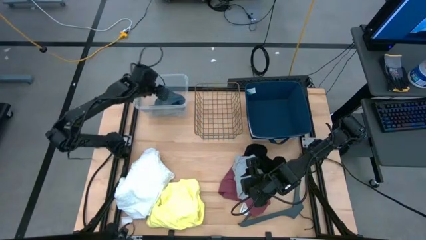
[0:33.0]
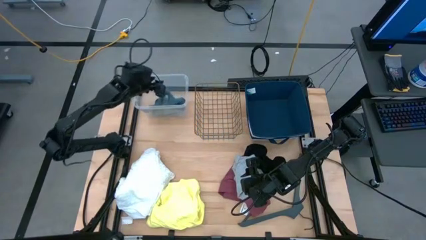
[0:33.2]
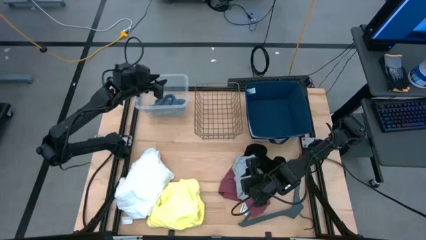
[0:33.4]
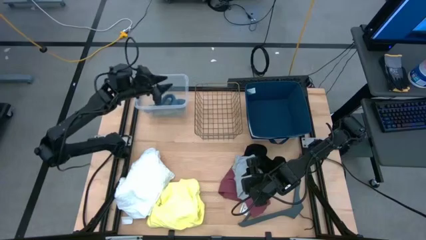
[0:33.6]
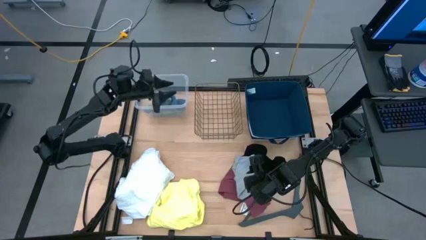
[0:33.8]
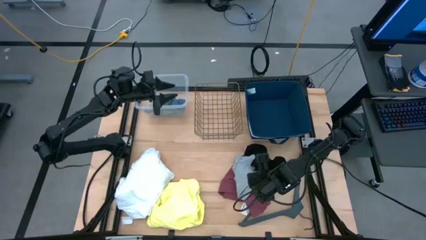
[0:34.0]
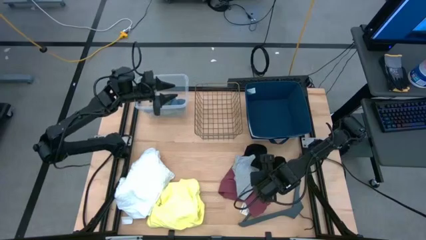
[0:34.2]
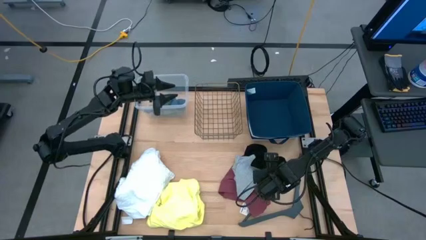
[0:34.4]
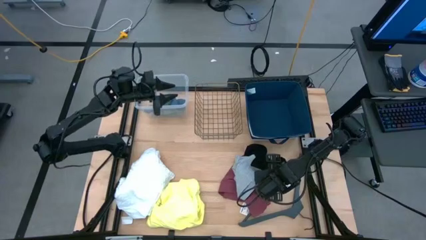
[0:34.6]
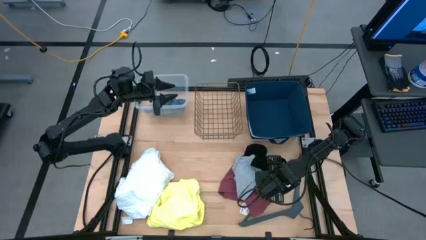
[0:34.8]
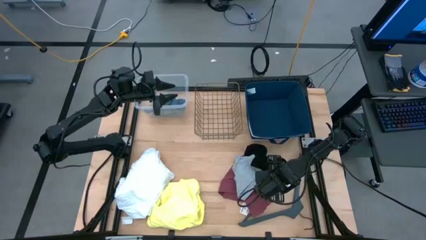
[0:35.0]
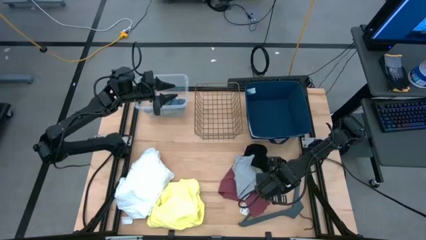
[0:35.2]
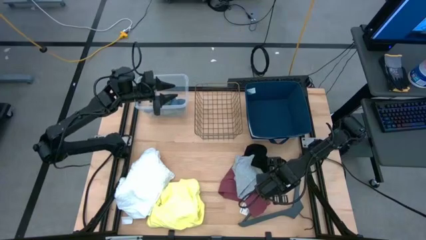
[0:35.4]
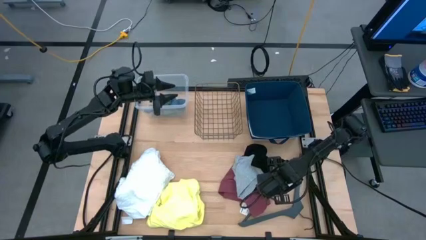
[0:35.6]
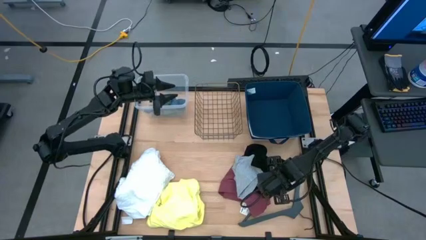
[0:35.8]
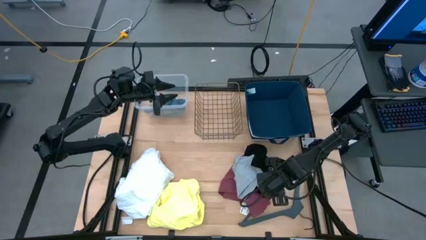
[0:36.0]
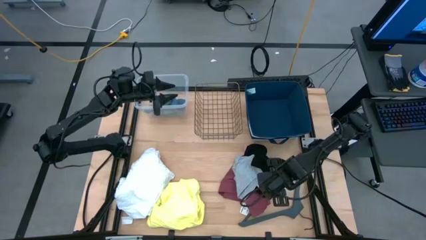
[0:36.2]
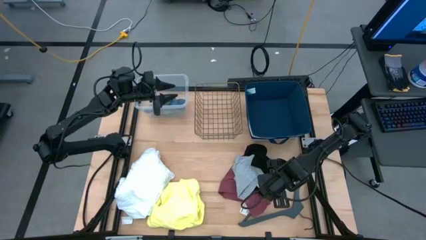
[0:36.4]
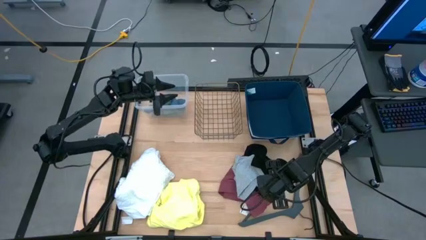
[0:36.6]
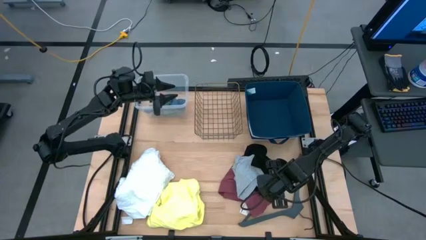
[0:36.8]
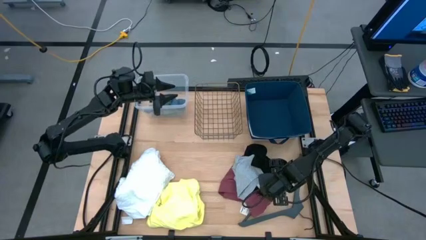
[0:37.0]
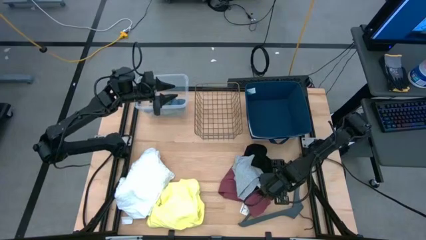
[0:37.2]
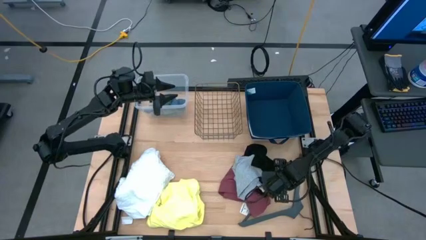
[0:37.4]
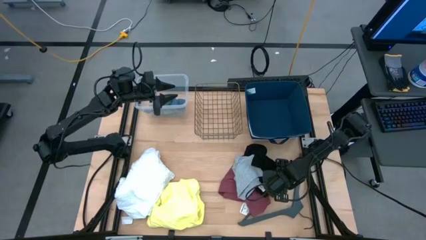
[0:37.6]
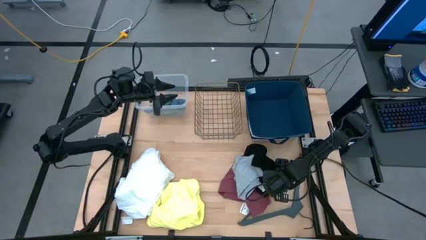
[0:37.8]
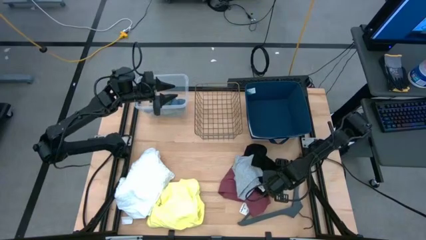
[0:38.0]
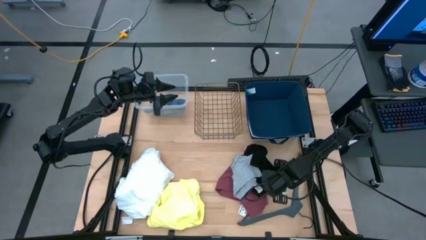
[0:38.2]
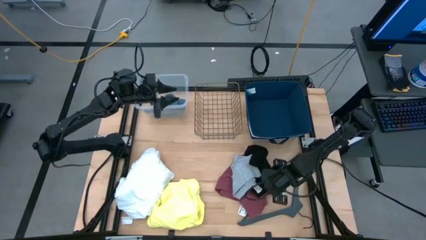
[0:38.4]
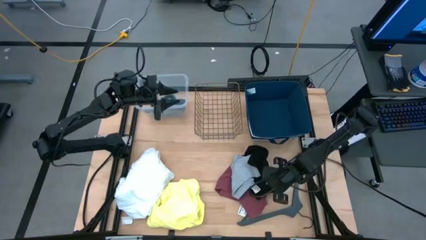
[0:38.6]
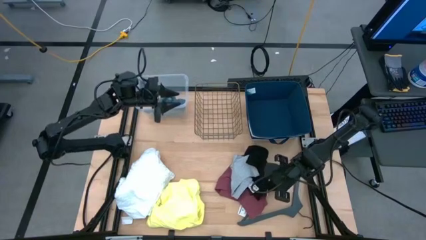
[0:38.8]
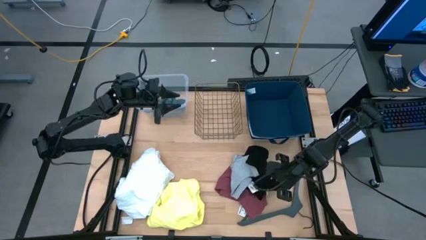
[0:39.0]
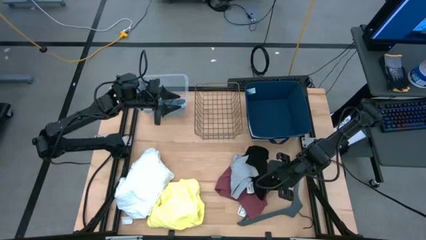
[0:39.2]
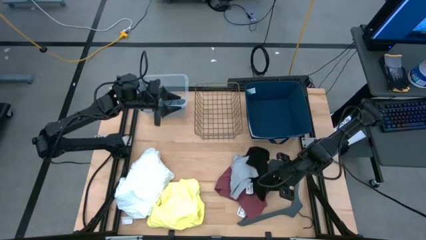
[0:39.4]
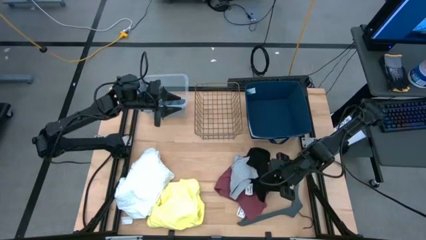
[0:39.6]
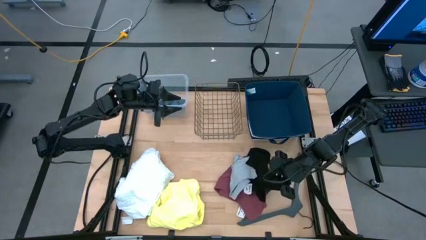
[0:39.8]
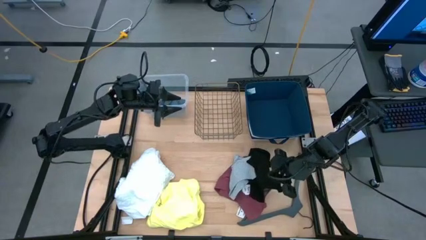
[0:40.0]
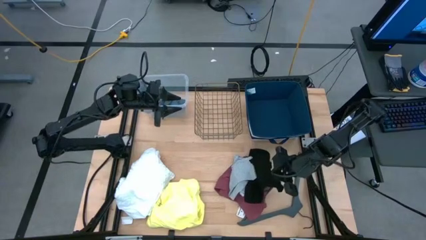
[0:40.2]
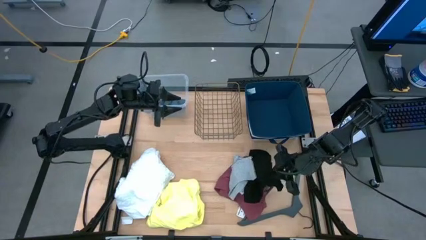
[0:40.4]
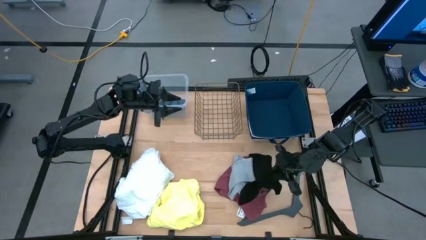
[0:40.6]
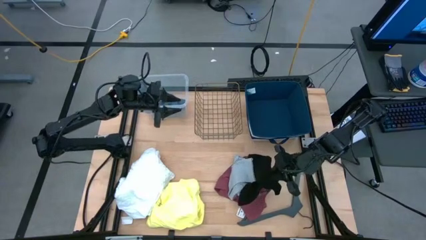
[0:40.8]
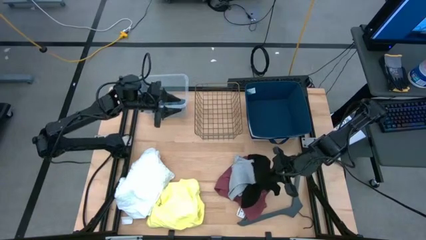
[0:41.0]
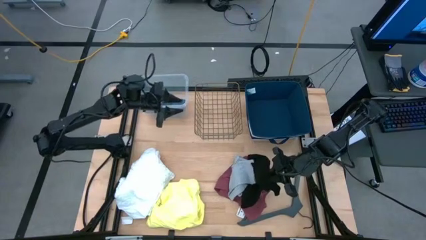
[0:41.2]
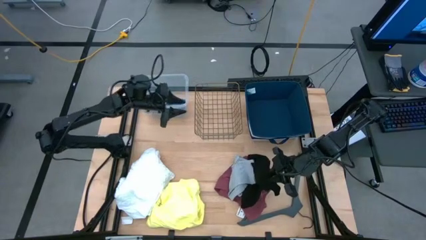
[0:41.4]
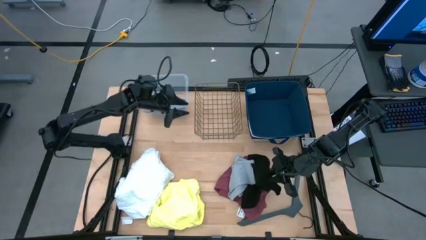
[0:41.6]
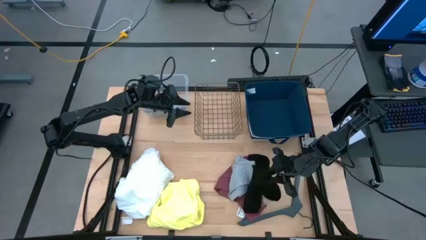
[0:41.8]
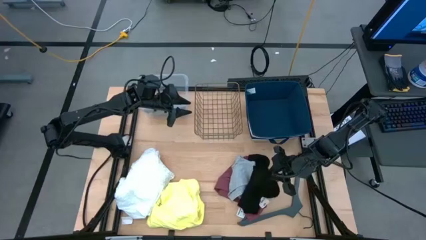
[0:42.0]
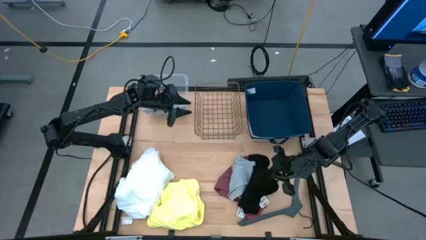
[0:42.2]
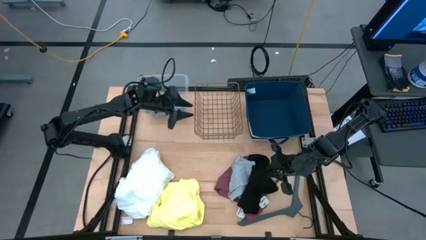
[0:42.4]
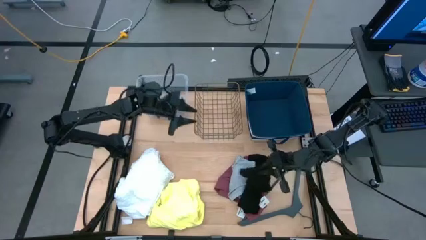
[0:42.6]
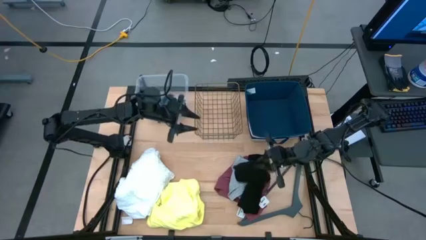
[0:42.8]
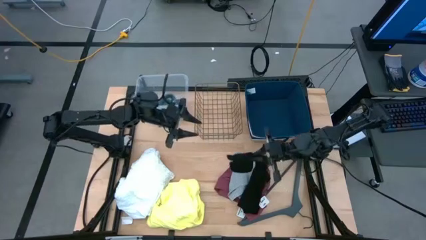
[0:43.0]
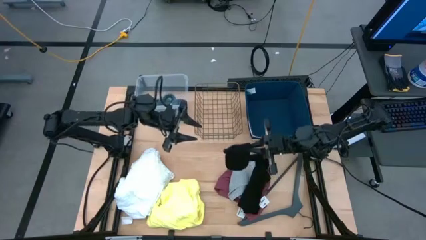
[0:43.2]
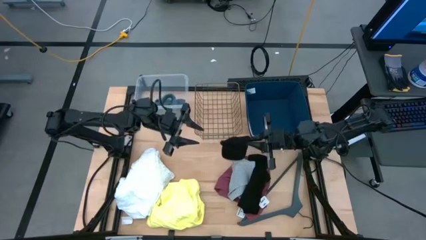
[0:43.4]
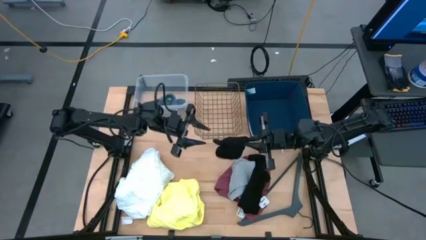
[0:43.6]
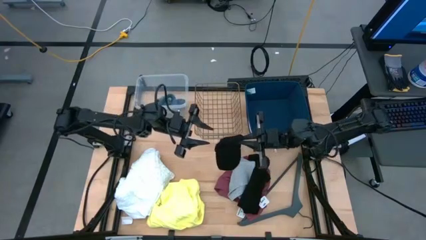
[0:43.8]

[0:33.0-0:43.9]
Task: Pick & Place Cloths
Put the black sock into the transparent container

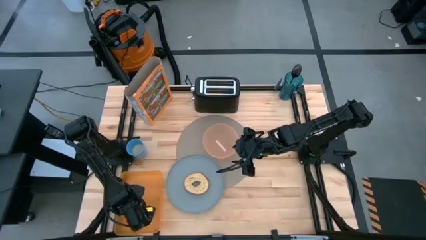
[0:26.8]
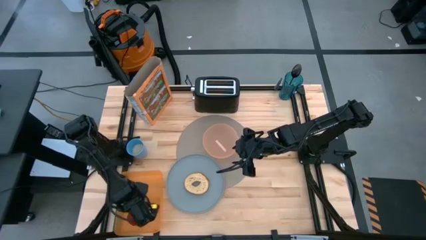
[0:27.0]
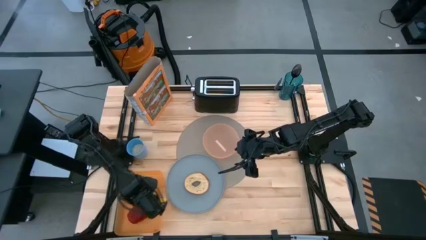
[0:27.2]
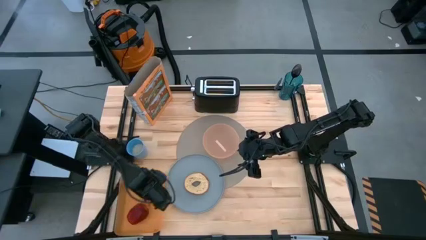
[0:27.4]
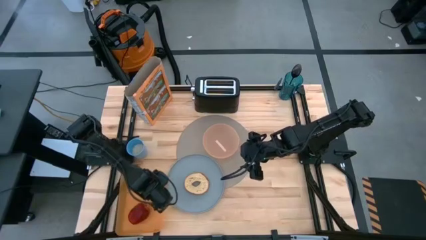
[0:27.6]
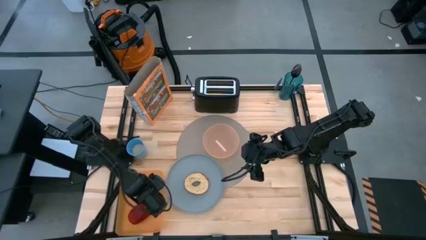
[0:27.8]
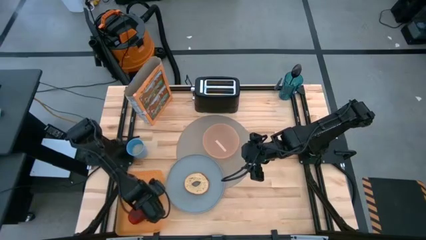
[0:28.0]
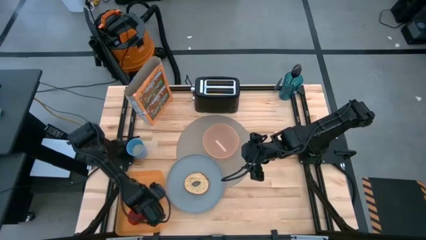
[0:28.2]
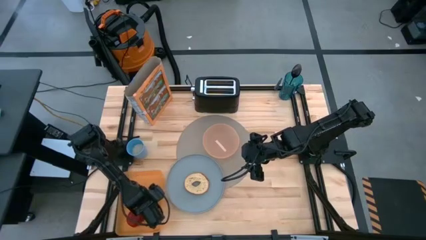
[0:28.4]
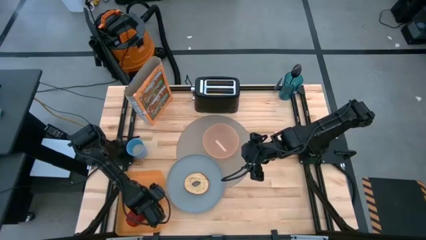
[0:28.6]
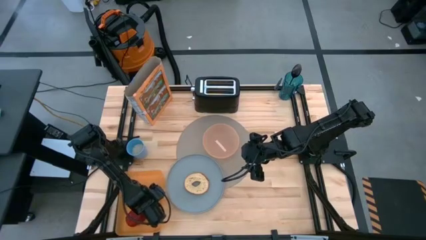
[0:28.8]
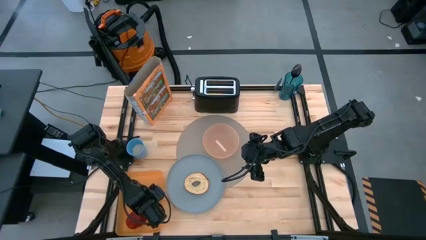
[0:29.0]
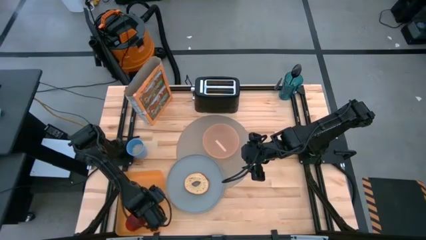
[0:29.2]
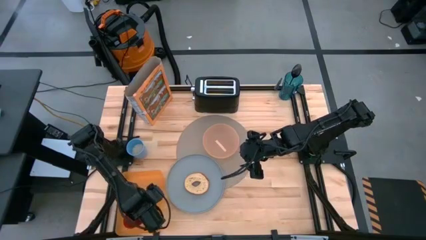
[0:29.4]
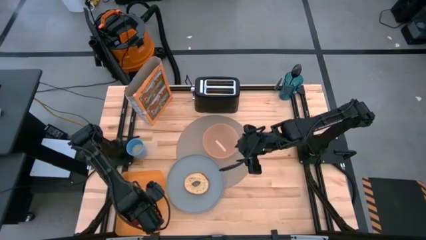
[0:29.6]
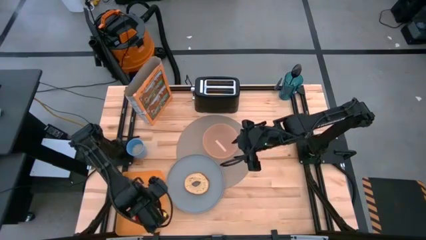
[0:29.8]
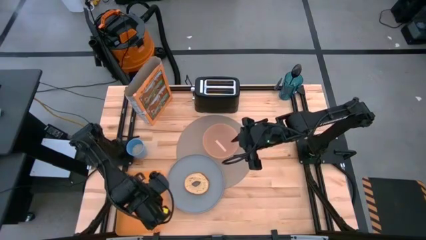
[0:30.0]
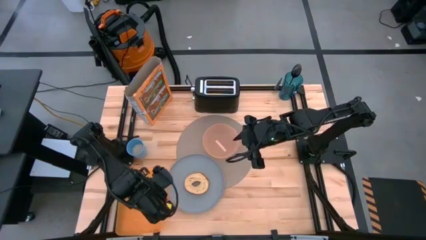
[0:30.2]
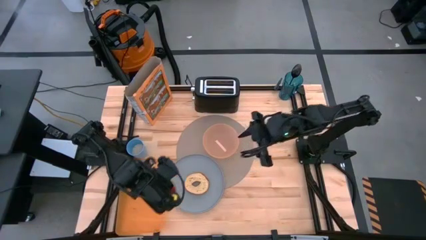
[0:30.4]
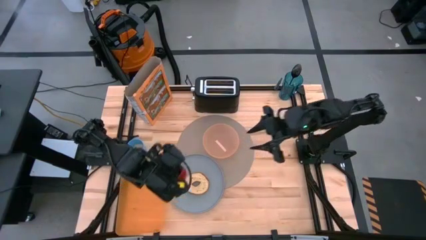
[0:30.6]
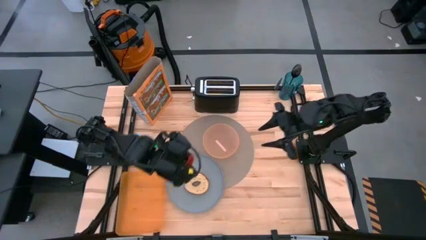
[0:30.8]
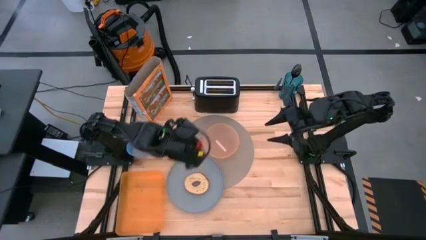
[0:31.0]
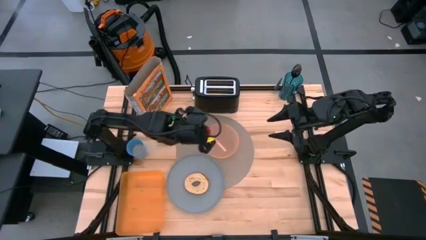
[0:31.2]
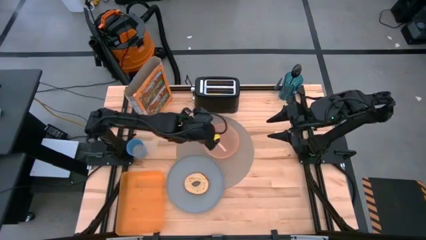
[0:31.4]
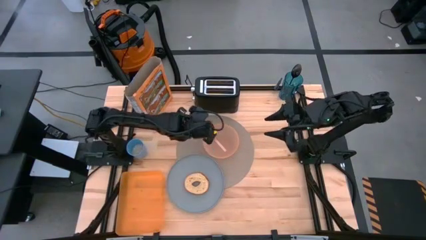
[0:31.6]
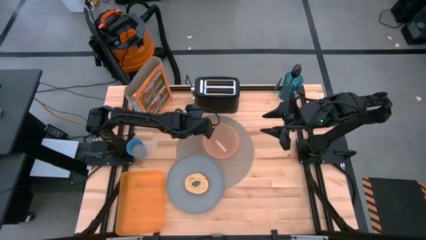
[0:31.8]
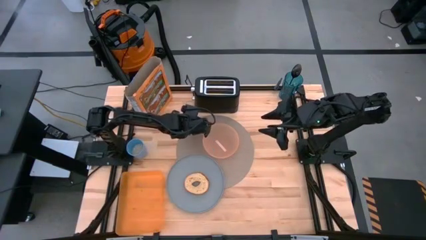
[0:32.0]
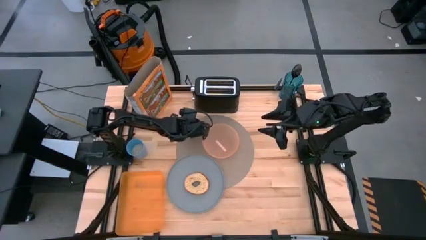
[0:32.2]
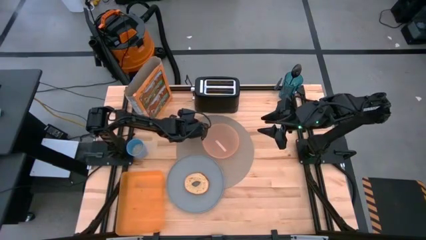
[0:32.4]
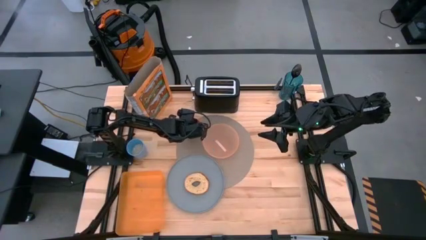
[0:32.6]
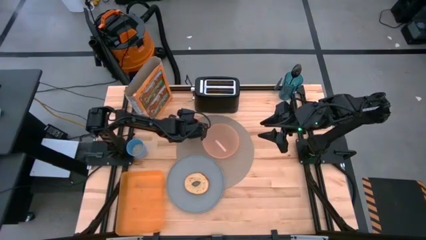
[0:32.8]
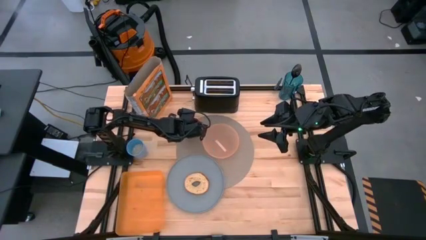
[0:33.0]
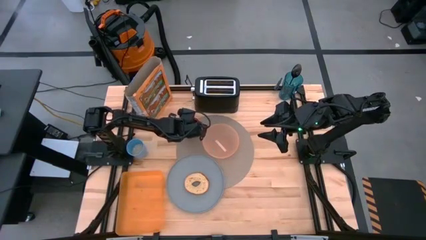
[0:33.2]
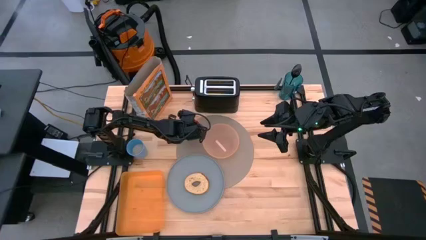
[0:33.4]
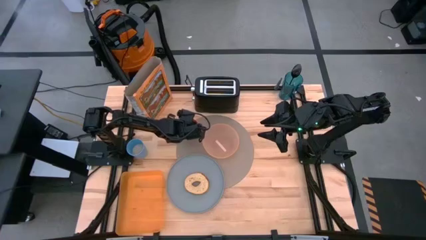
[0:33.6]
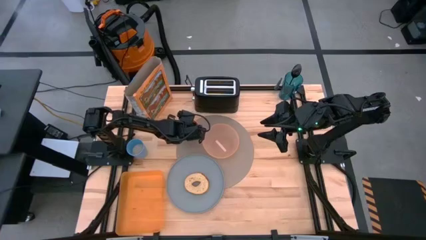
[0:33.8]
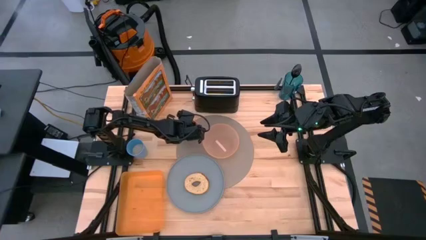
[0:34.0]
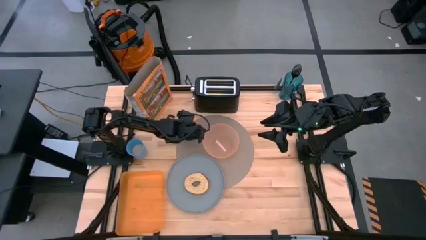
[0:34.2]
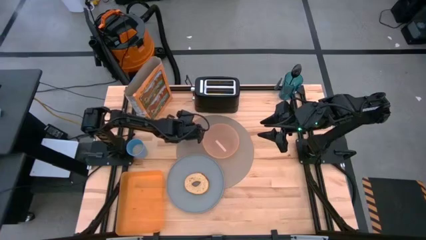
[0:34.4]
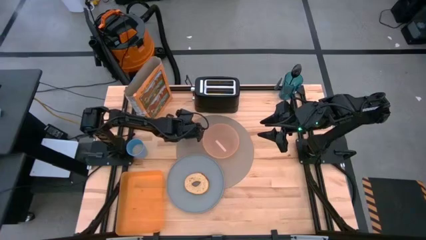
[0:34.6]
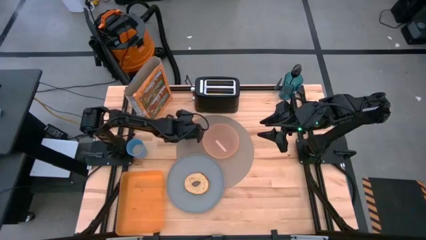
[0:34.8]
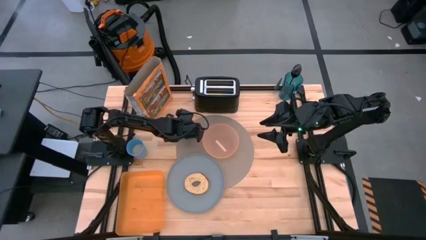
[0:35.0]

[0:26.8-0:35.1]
Task: Arrange a breakfast setting
Put the red apple on the gray tablemat
